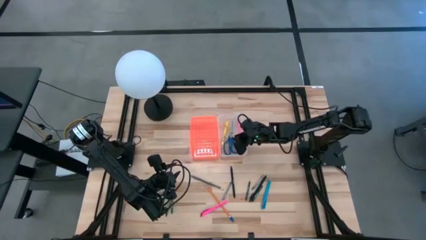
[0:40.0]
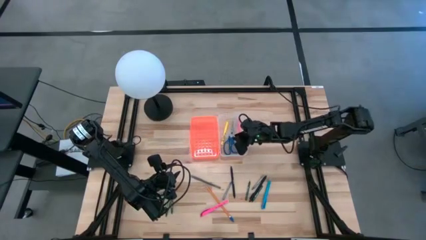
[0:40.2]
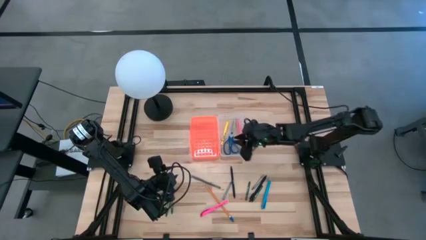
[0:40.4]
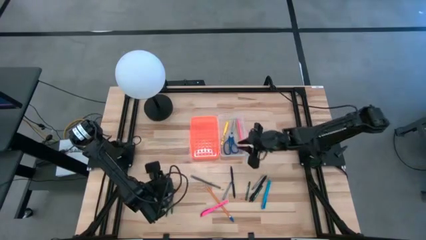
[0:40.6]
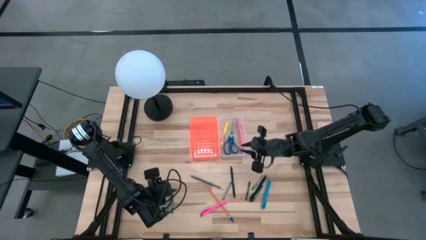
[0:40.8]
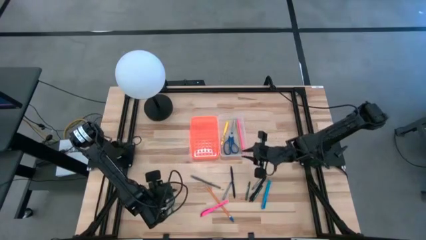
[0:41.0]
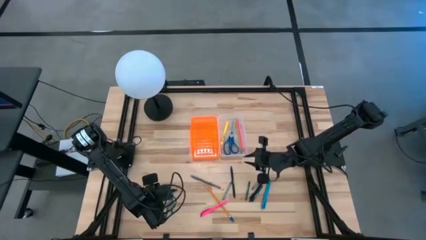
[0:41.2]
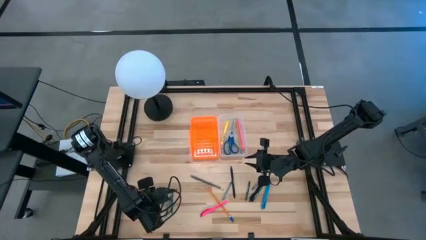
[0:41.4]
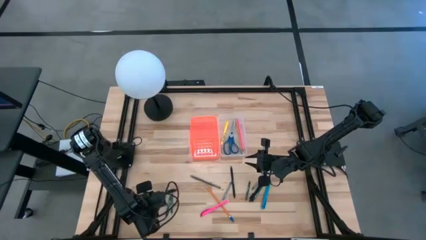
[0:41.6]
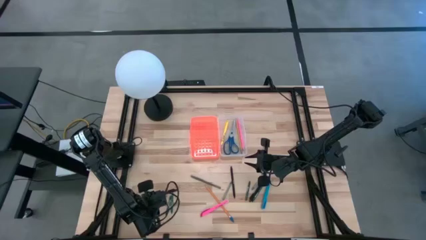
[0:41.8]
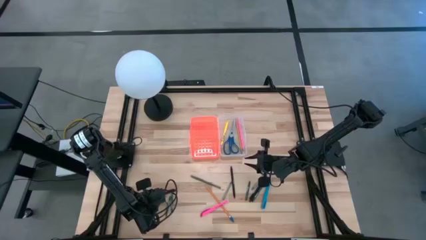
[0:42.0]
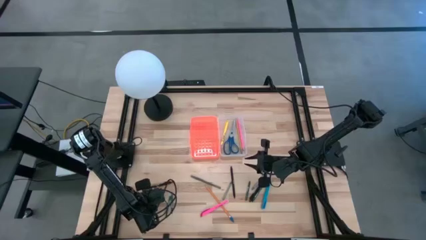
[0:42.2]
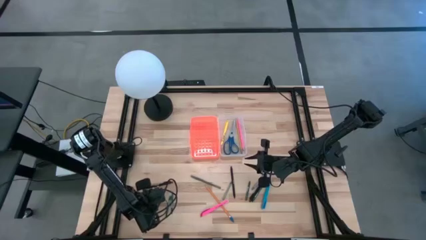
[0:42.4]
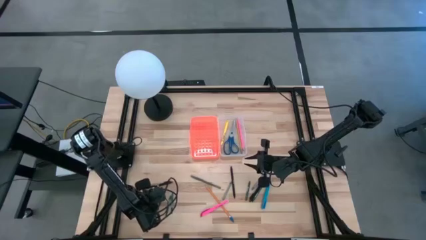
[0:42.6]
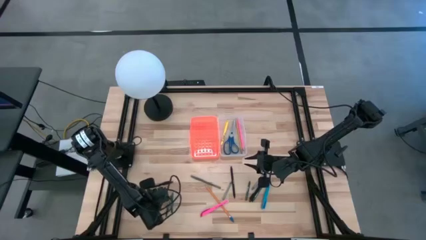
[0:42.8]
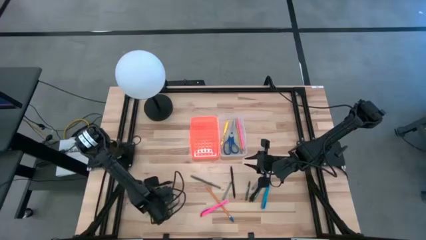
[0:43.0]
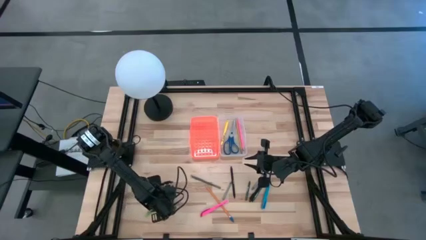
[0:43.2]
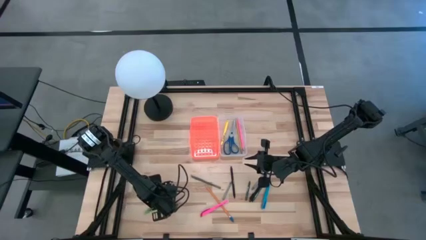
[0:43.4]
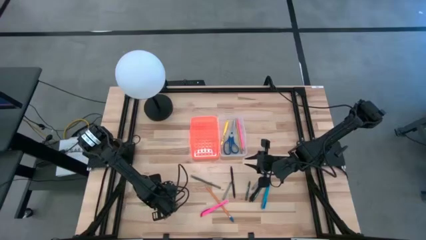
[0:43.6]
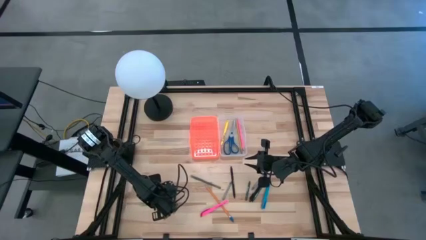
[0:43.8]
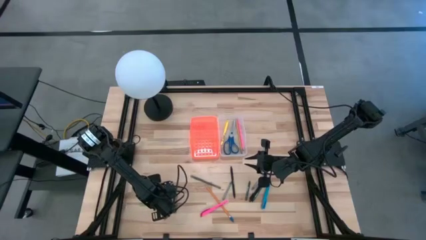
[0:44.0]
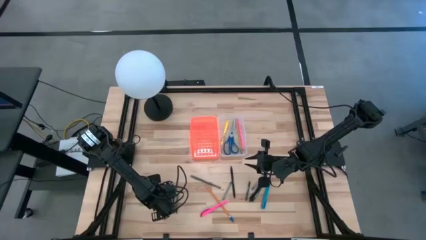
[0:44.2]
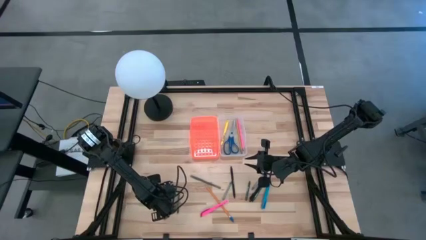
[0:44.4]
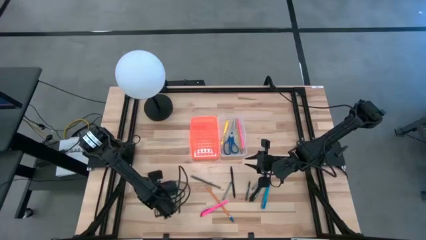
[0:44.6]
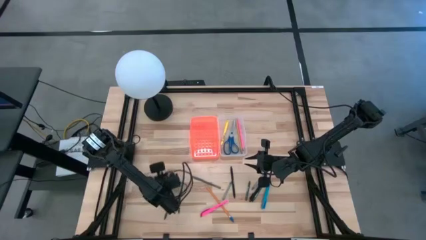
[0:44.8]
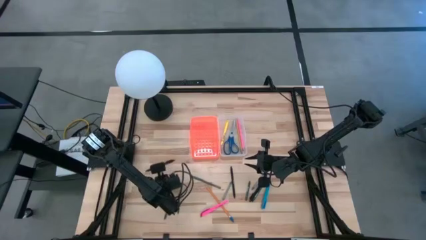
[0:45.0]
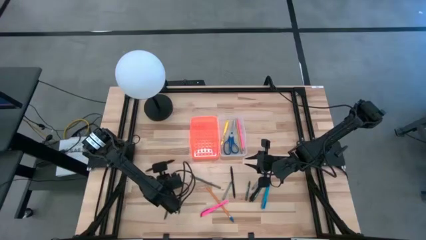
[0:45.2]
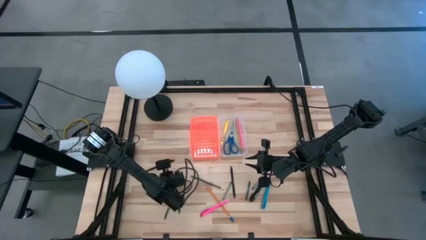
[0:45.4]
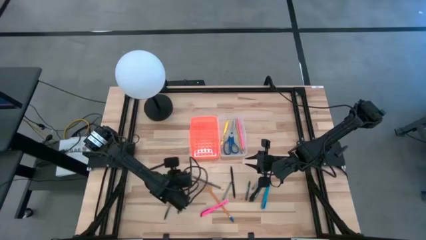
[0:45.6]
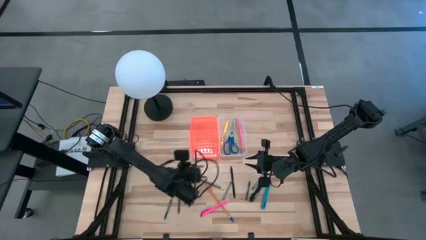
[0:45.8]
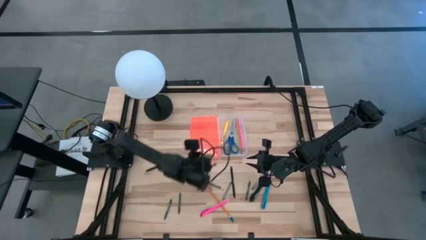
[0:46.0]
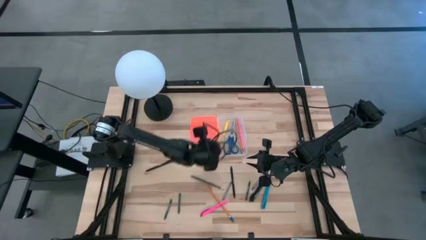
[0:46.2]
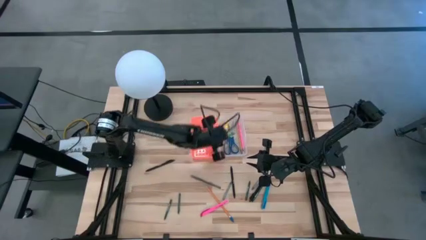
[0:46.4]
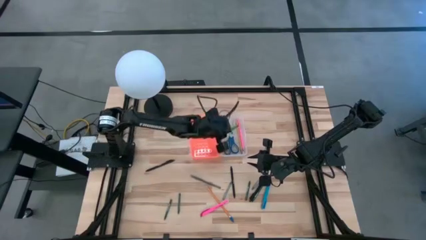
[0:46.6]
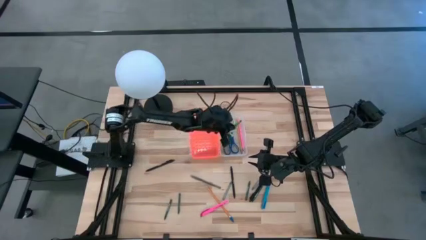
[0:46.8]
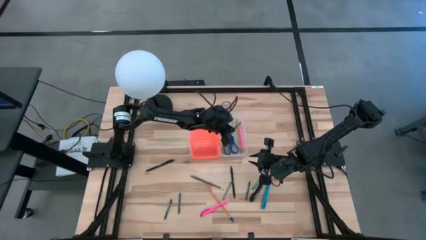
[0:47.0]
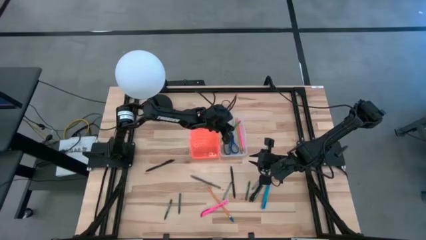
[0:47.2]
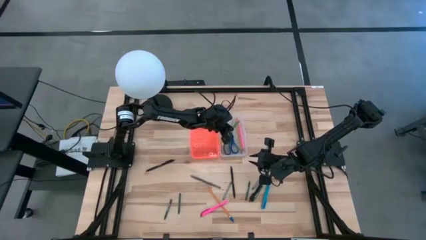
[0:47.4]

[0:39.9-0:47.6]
Task: Pick & place school supplies into a supply box
Put the green pen into the orange supply box

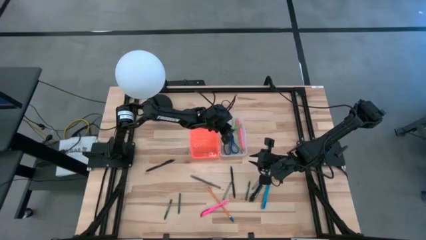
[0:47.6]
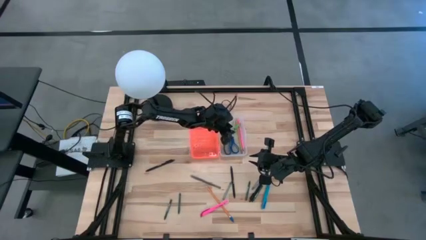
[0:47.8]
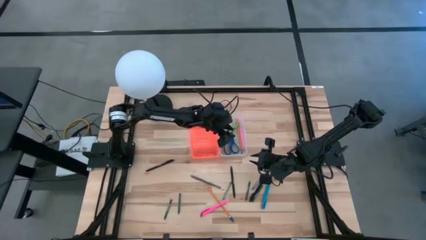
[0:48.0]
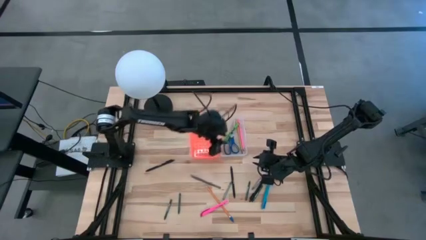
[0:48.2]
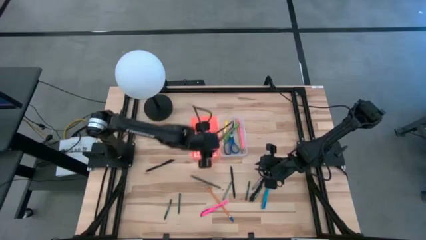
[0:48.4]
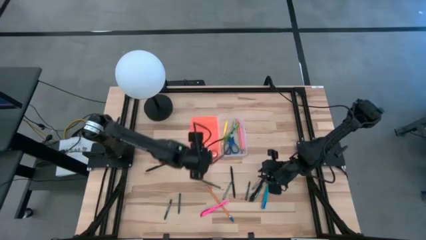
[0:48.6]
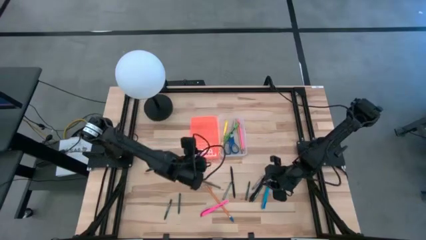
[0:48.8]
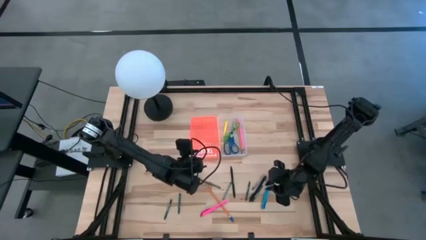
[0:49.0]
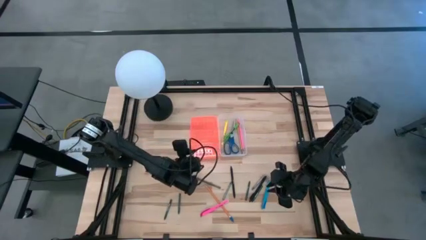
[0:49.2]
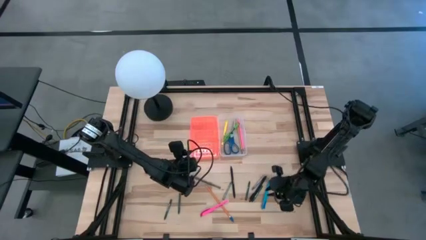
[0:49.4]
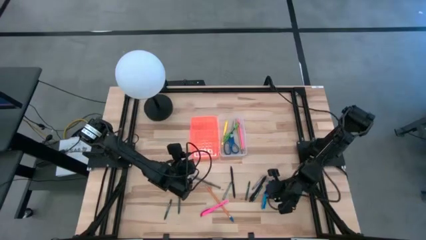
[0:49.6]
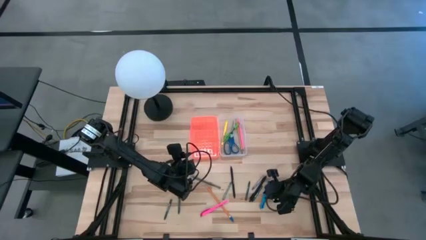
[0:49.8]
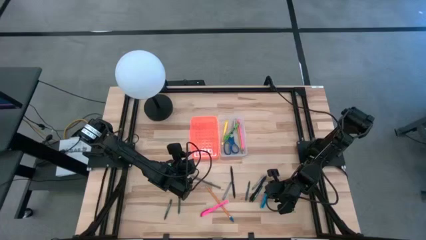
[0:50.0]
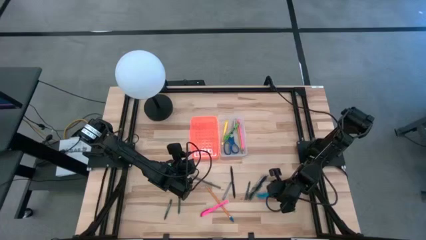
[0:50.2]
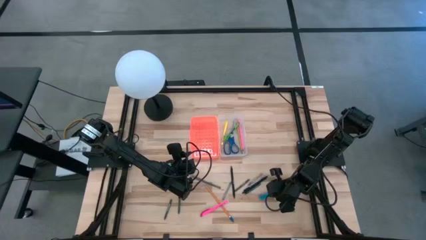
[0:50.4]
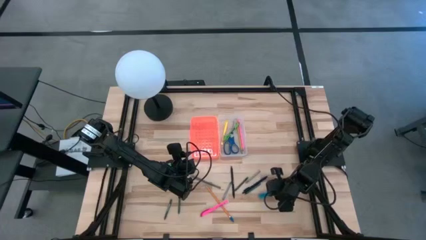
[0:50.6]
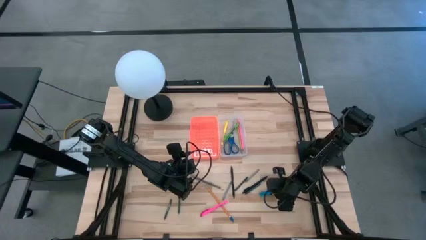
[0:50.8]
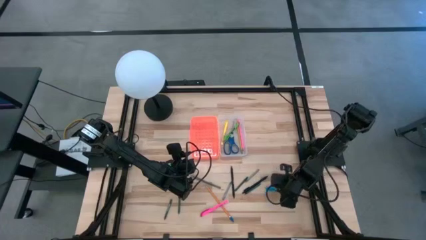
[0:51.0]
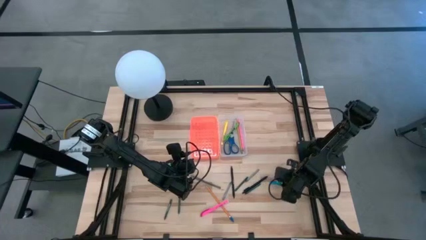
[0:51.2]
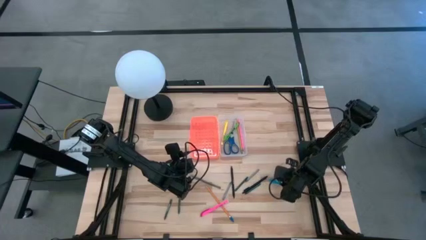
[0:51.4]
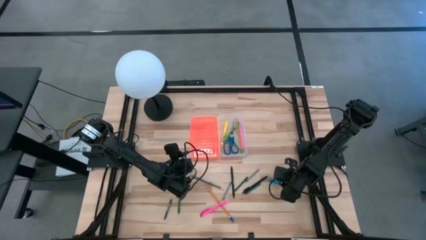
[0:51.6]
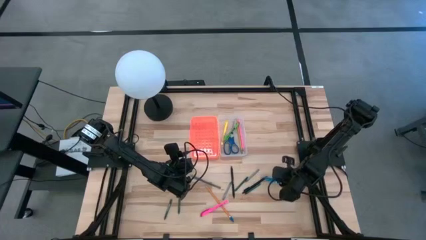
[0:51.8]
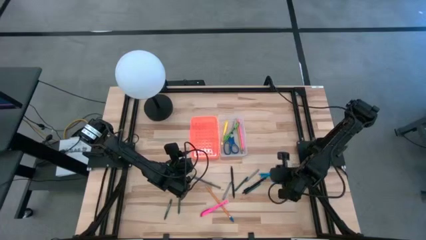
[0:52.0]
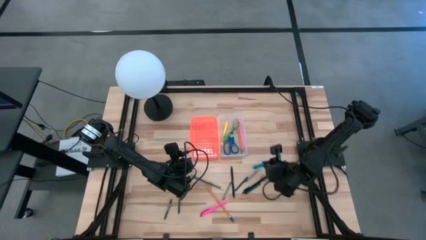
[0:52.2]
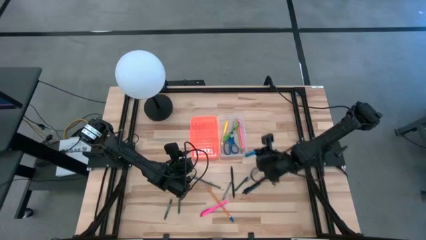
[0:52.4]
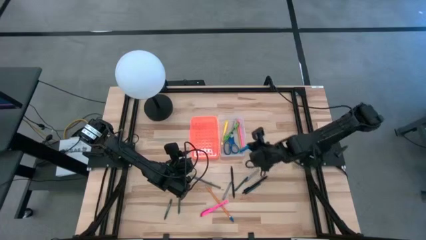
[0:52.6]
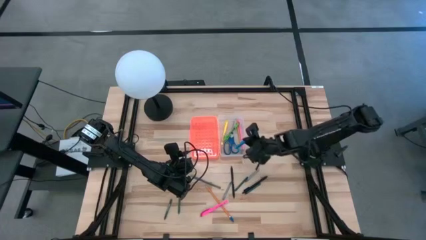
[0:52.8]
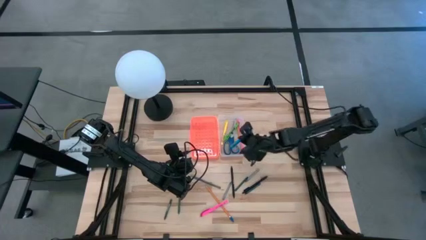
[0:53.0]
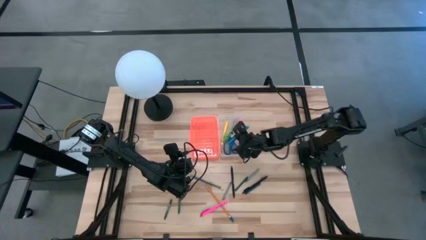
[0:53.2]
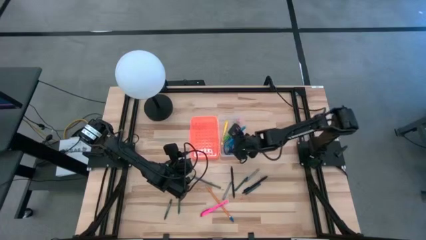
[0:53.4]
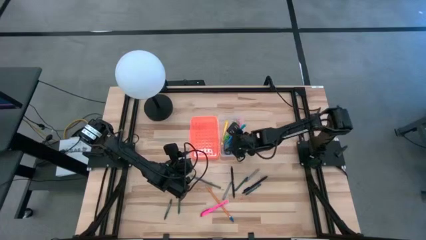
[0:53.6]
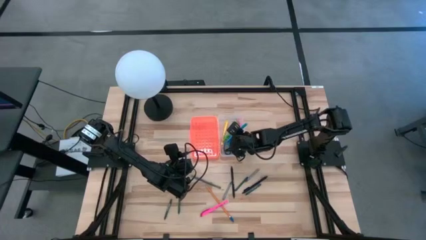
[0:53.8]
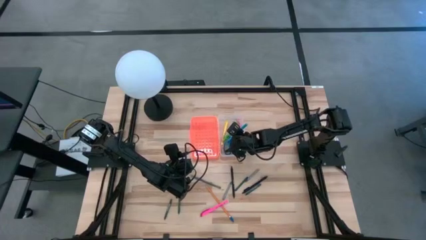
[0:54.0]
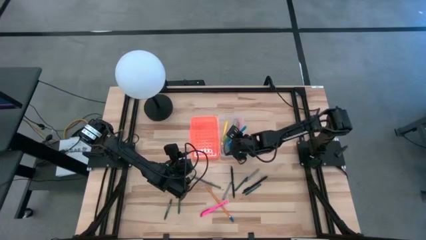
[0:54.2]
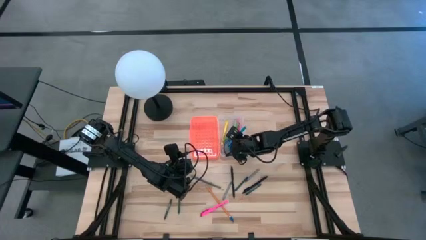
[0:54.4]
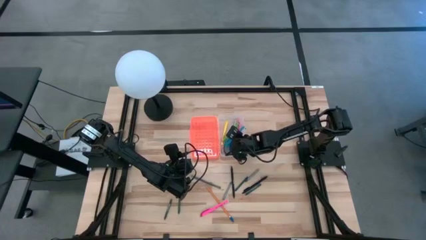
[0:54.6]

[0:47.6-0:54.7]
Put the blue pen into the orange supply box

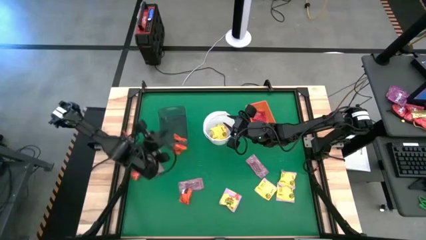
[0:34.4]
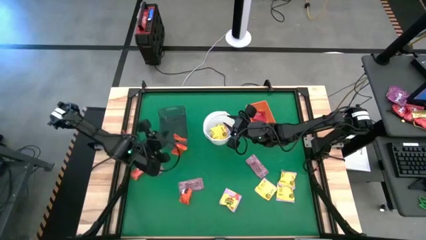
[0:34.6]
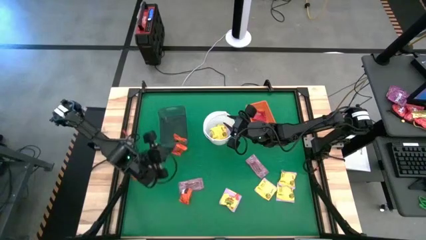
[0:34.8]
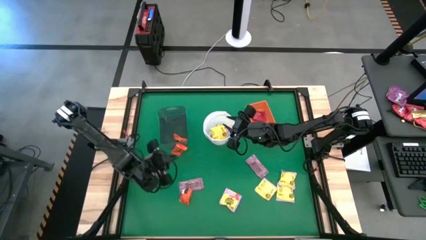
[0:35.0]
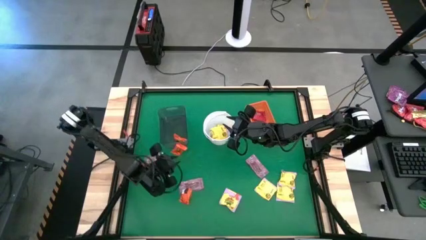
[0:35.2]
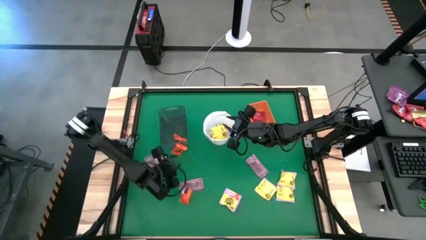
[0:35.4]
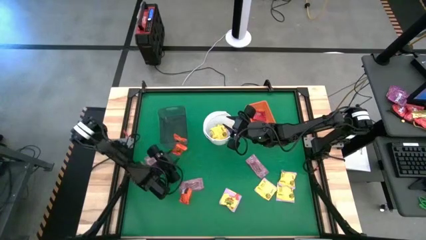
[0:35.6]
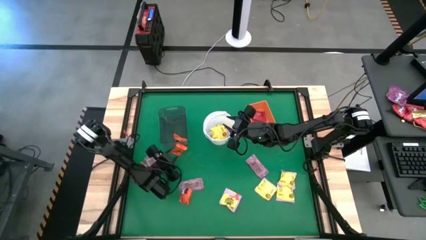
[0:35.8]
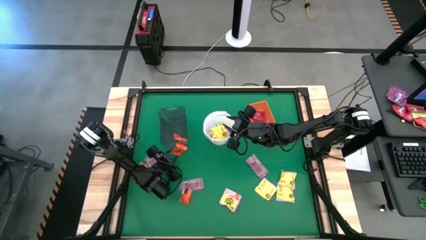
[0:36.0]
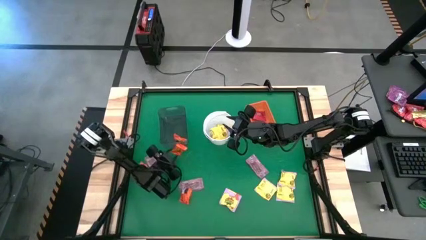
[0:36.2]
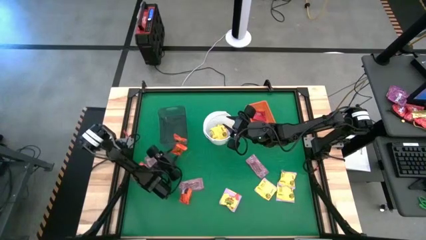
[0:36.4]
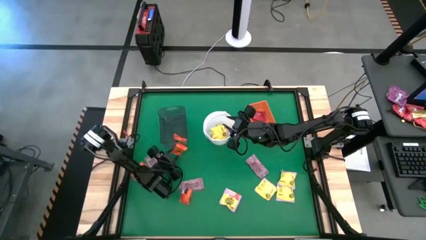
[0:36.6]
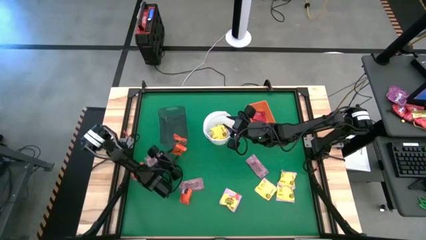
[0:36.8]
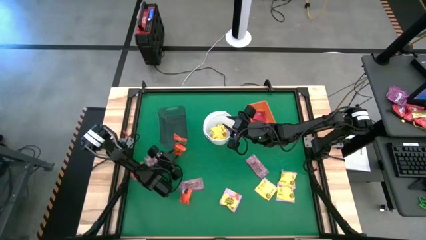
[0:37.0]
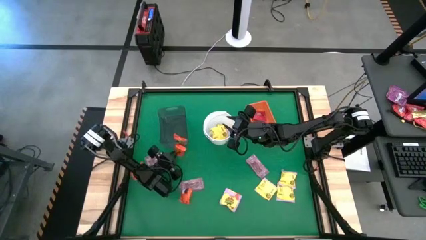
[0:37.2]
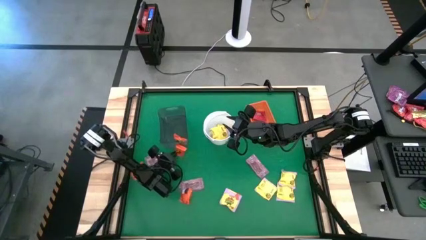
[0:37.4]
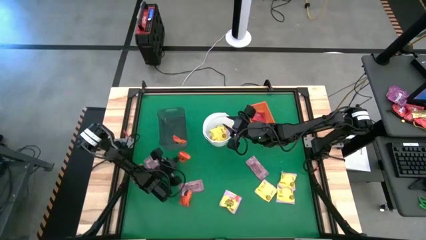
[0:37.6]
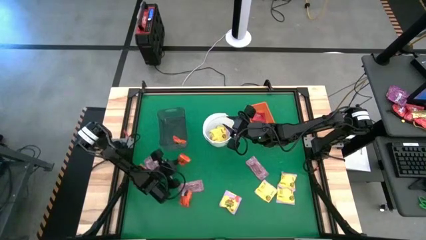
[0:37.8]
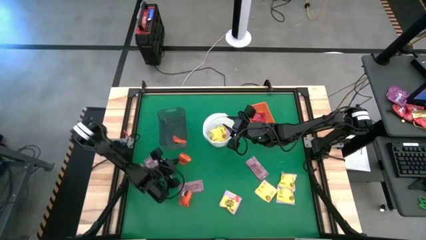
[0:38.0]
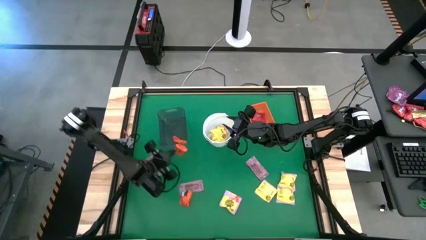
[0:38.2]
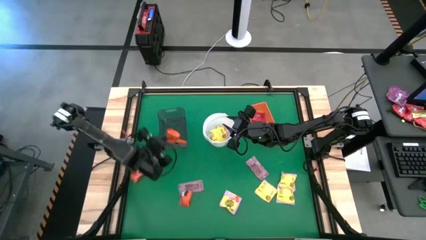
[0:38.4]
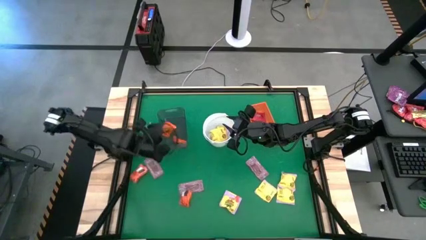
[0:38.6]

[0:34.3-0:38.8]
Task: Sort candy by brand, put in halloween buckets
Put the orange chocolate into the black bin
